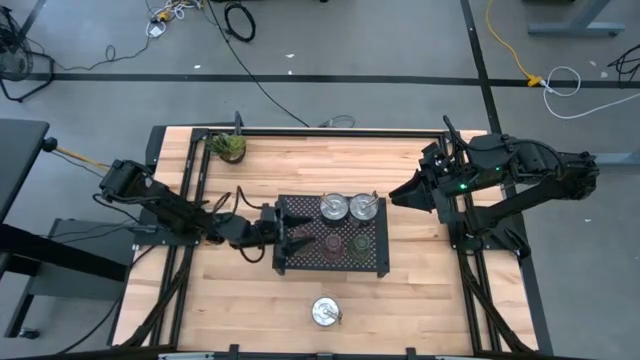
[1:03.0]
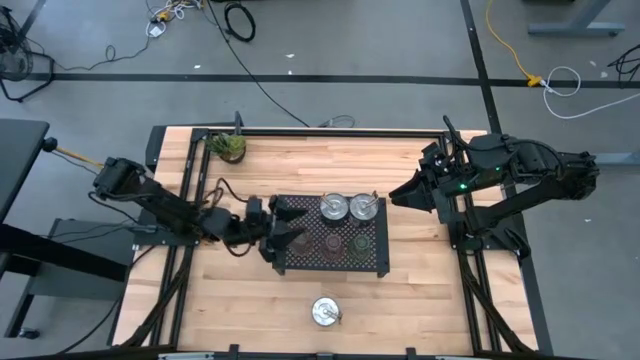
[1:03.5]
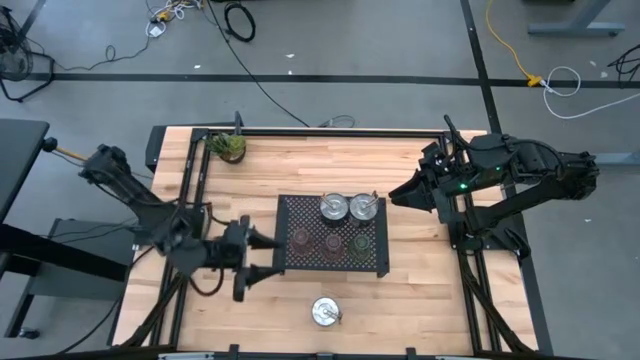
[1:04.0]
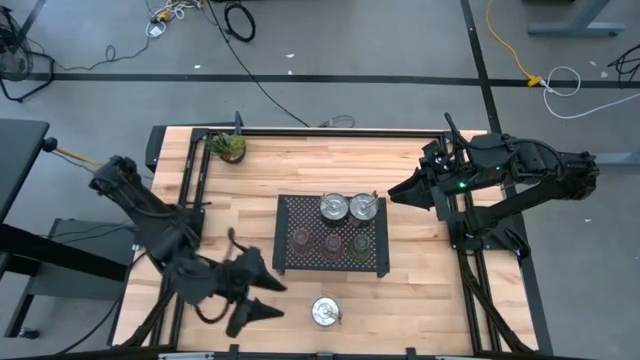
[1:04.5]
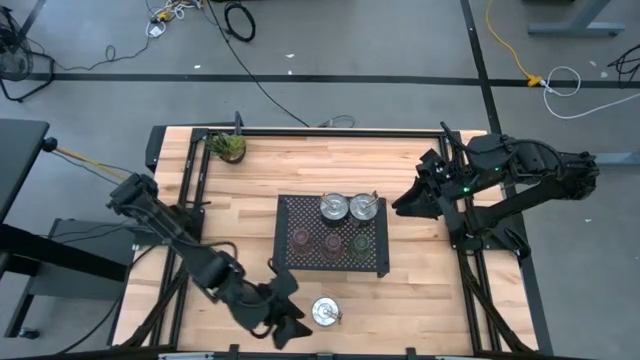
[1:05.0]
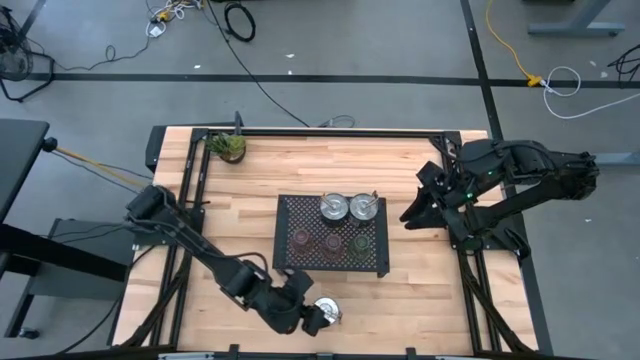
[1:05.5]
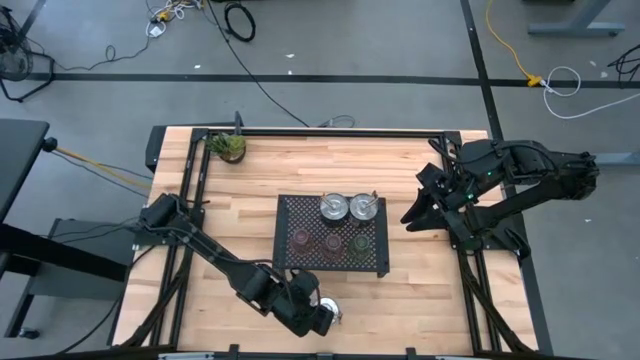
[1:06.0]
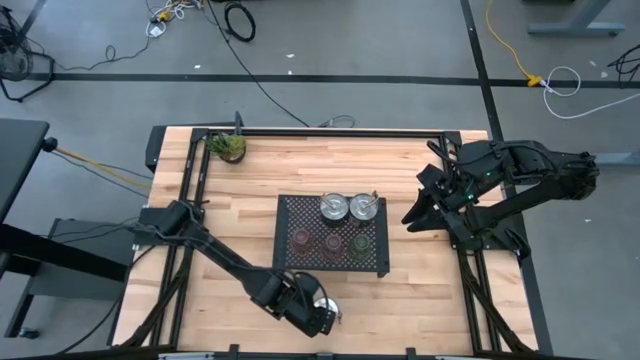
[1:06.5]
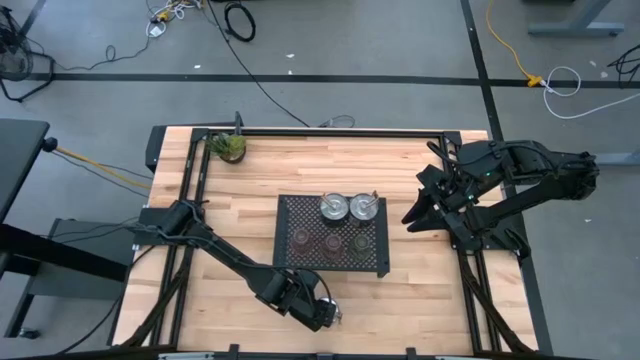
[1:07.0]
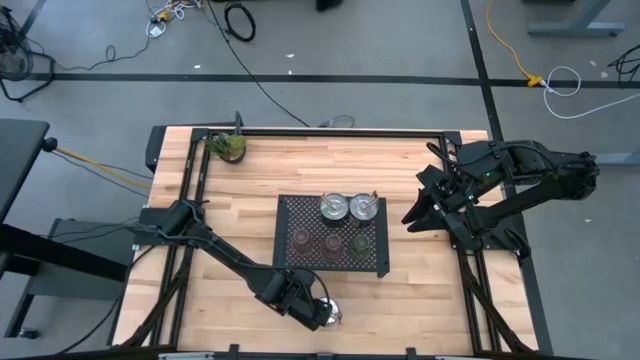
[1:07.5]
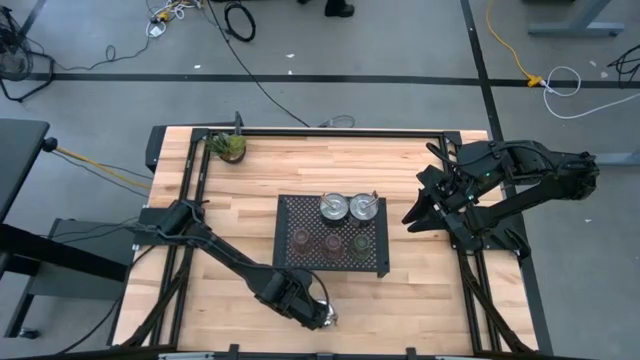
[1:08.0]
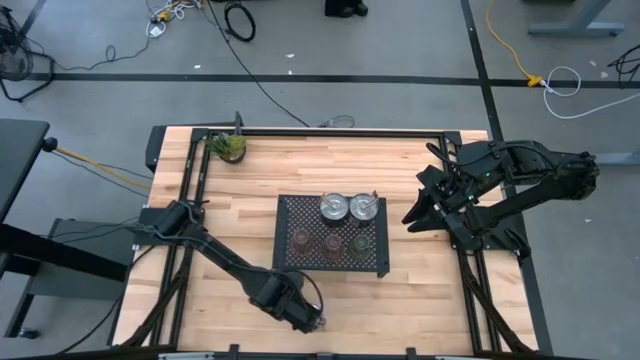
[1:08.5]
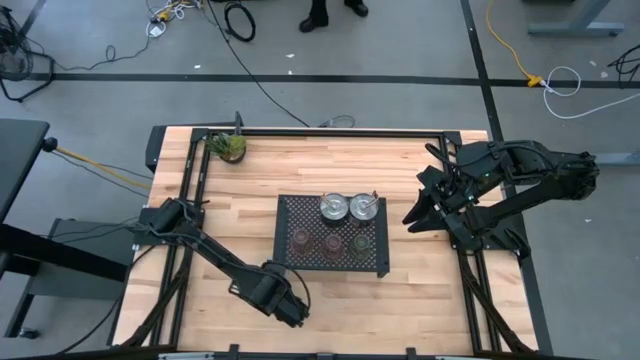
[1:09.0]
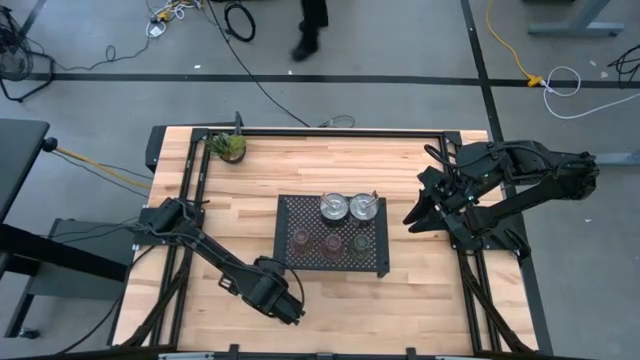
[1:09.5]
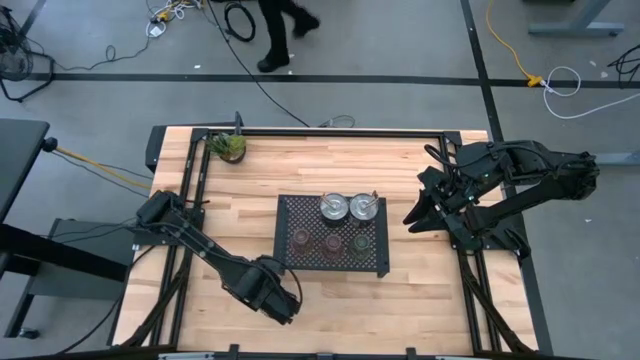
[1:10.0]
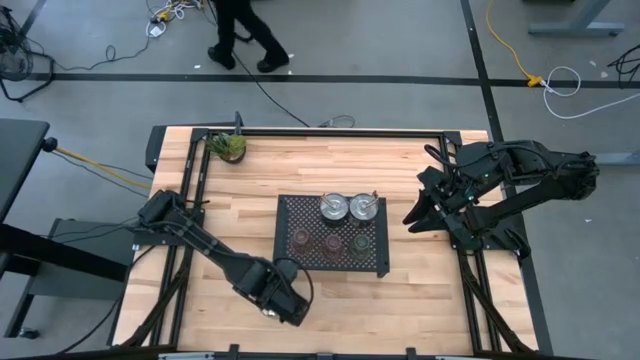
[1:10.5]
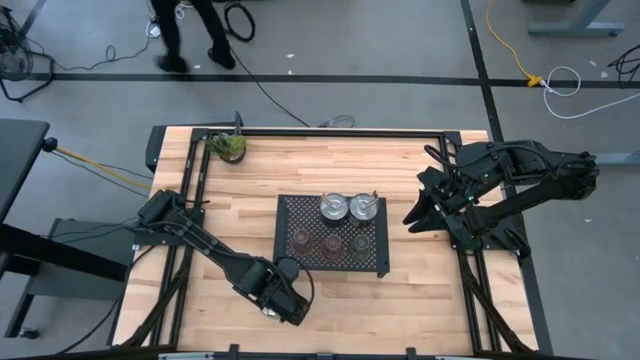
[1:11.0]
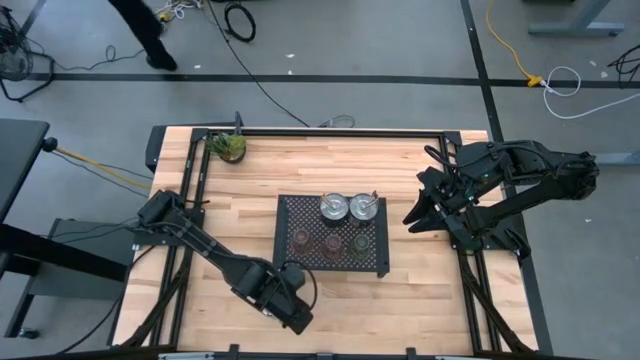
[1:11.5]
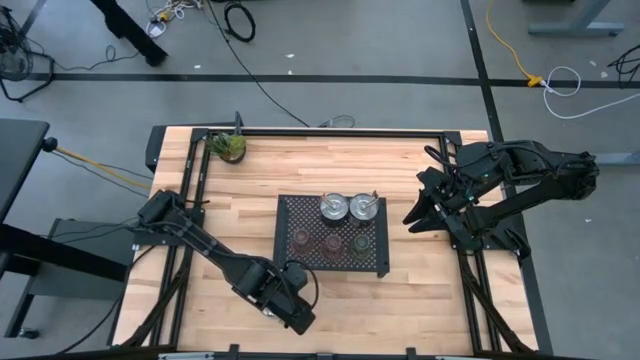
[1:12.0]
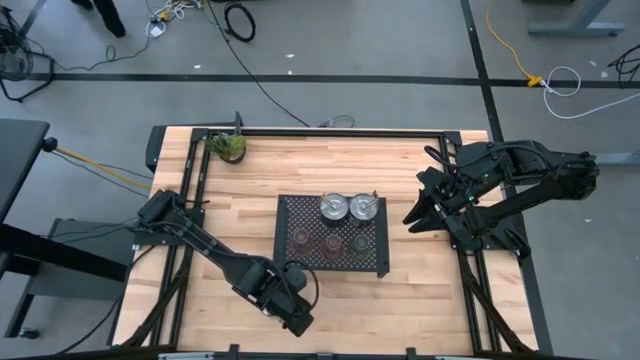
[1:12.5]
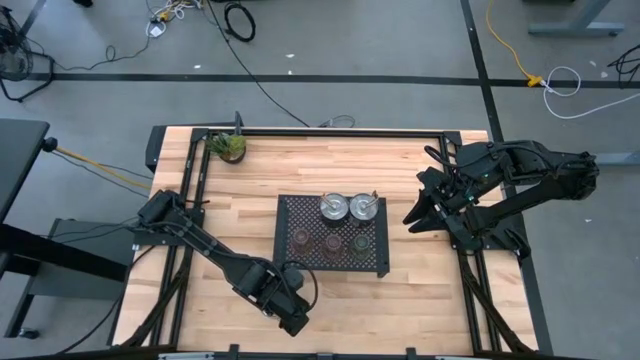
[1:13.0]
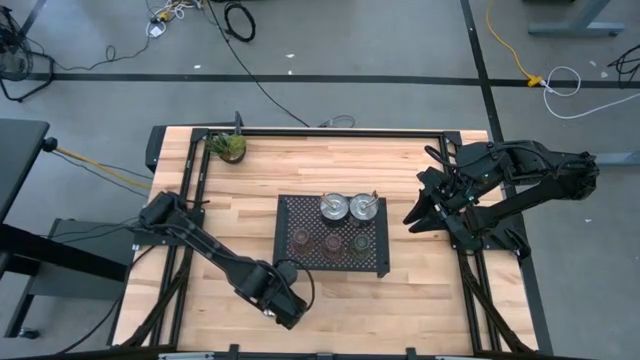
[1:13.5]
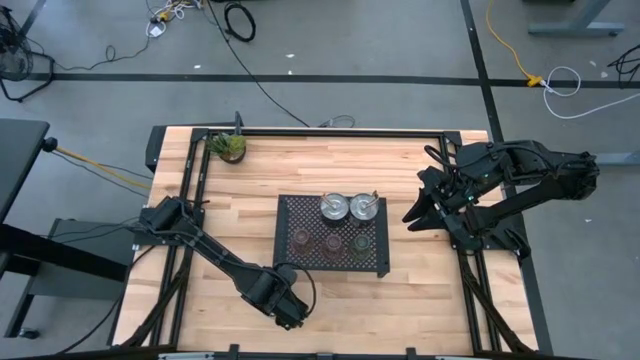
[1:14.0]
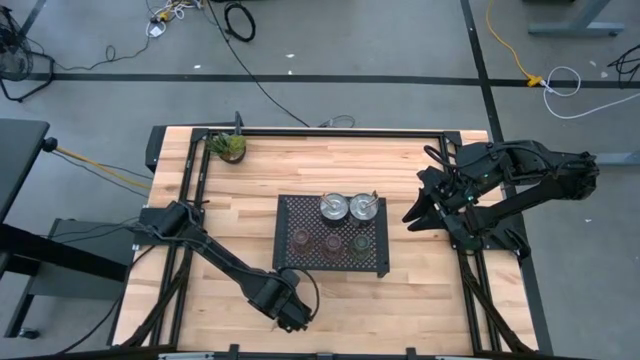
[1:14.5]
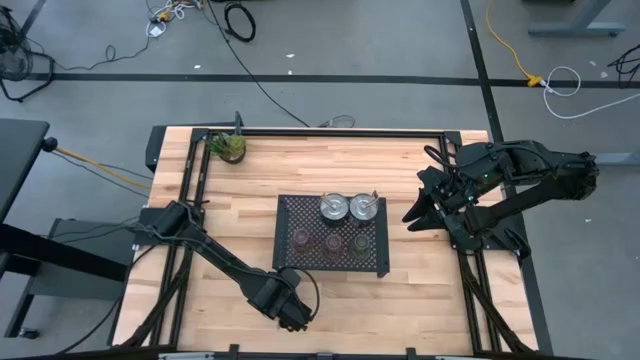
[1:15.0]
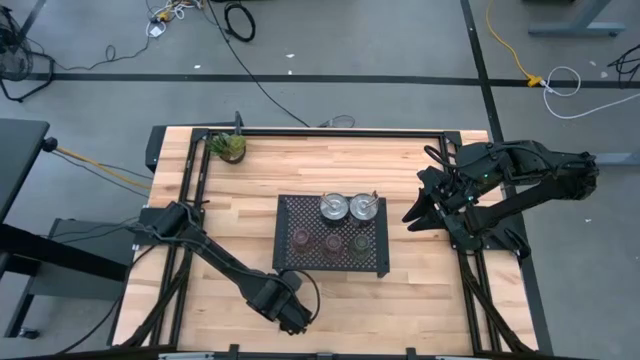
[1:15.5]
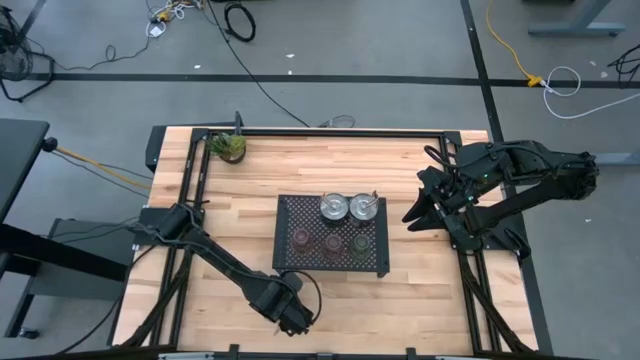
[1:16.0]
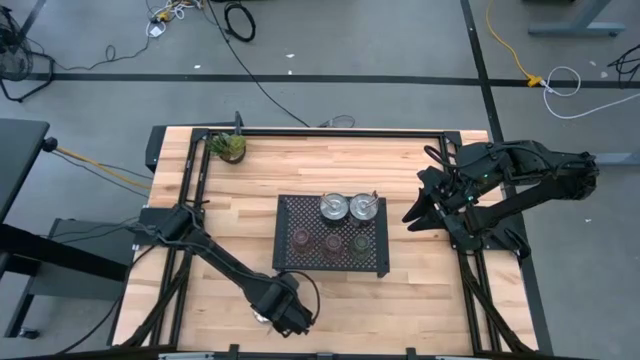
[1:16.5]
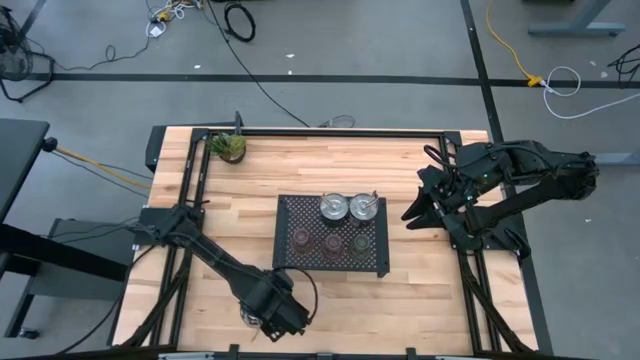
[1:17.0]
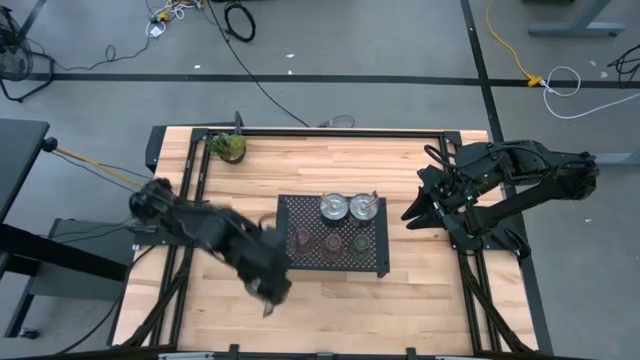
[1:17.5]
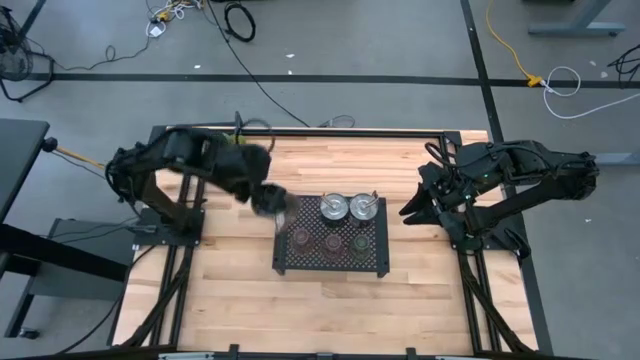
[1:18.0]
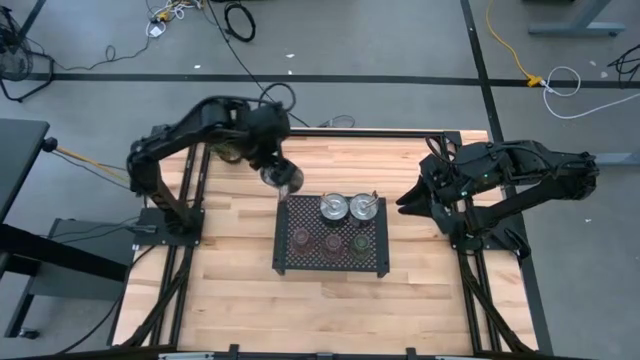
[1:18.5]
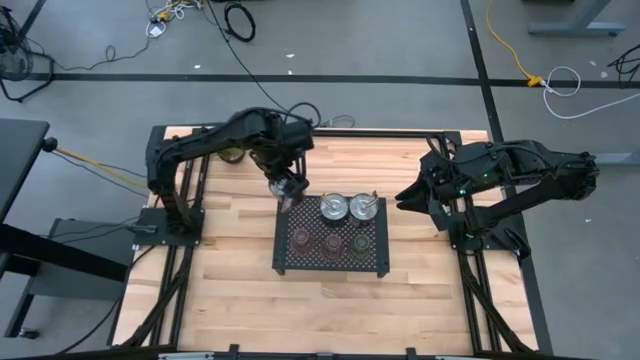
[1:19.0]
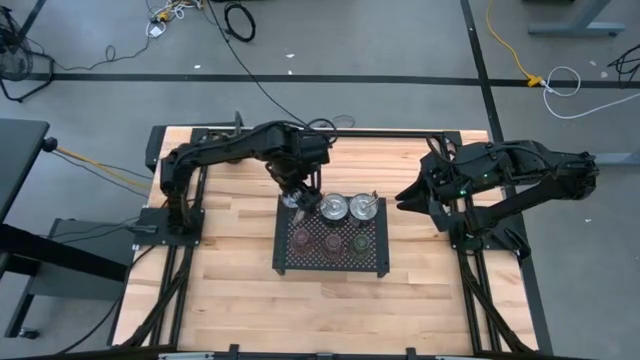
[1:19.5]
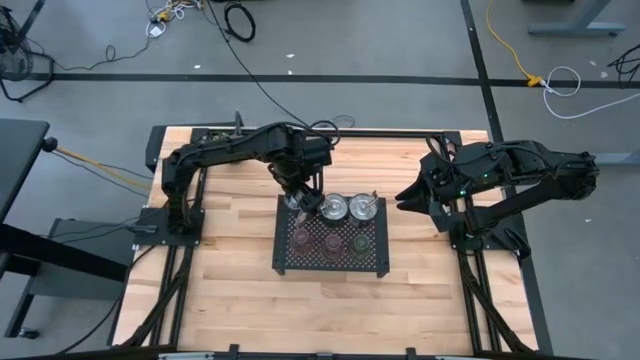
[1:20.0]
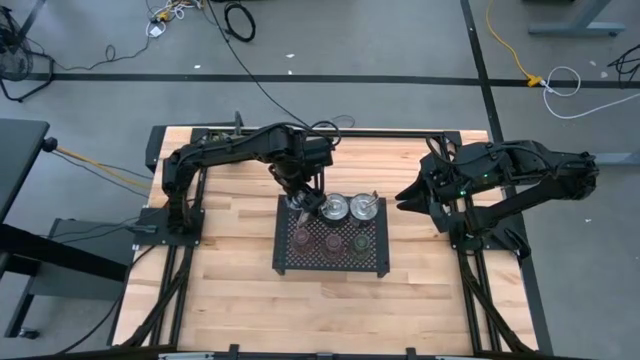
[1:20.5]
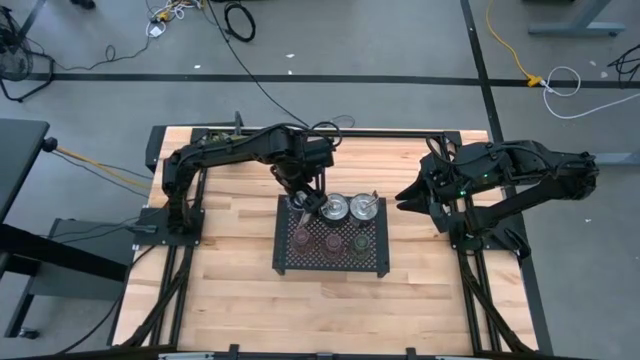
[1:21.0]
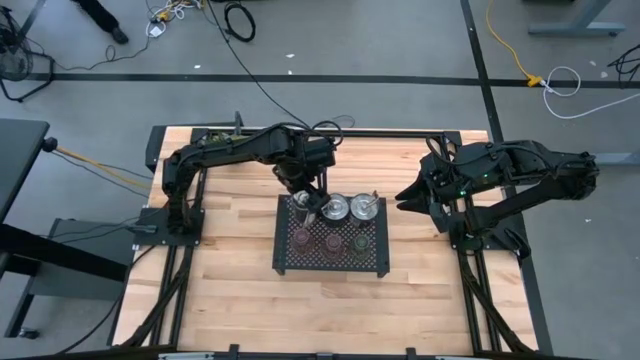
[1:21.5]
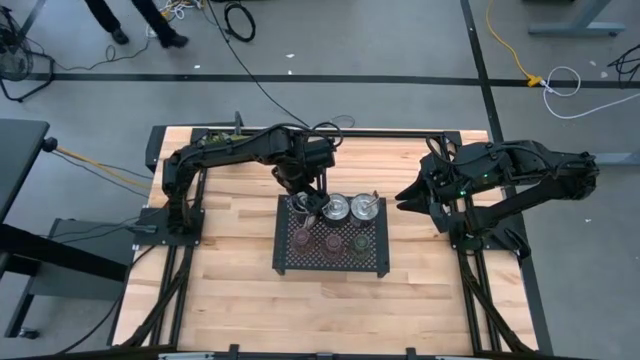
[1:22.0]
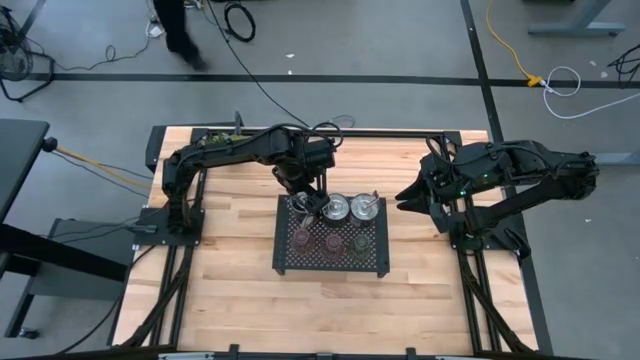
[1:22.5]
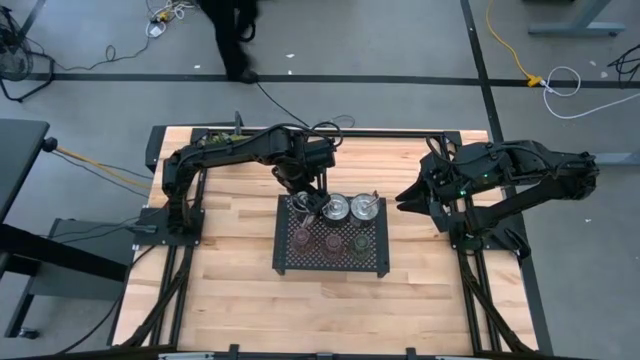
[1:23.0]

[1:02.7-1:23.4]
Task: Pick & Place candle stick holders
Put the silver scented candle on the shelf aligned with the silver scented candles
